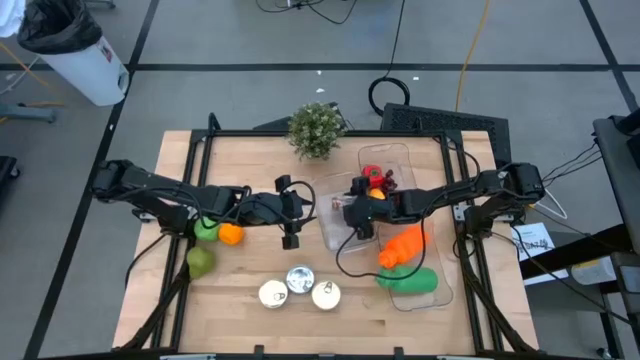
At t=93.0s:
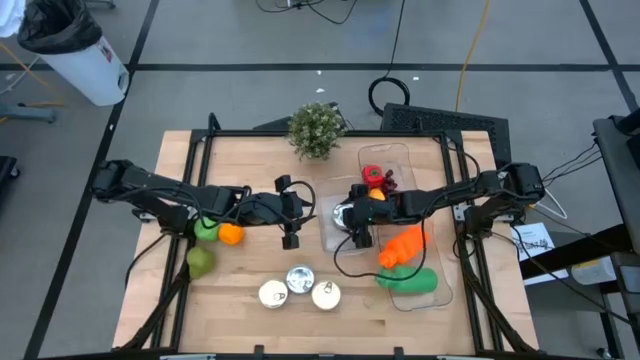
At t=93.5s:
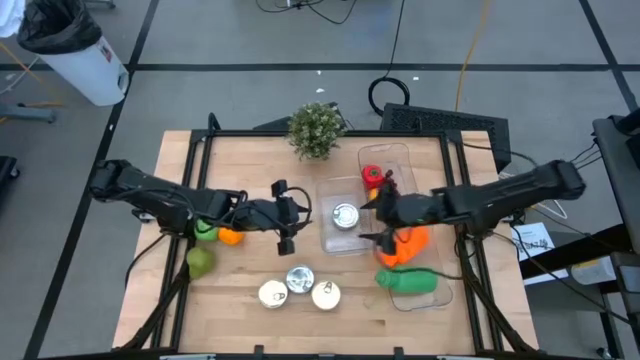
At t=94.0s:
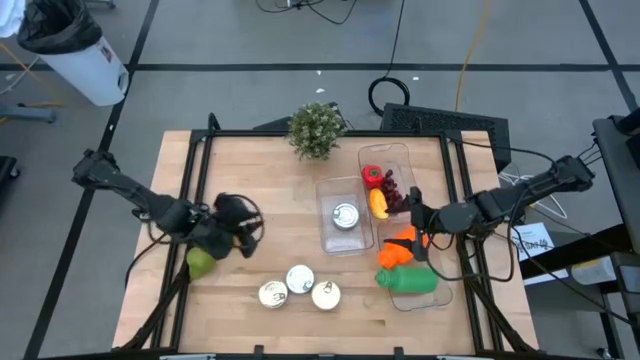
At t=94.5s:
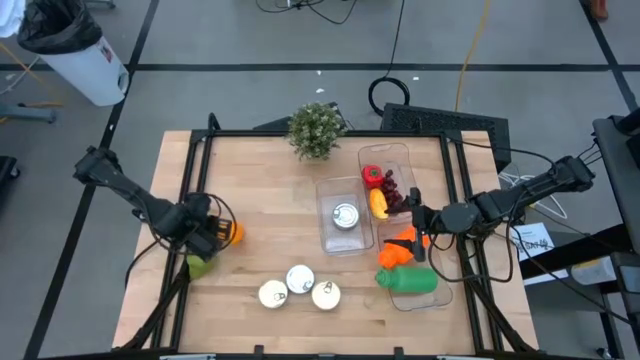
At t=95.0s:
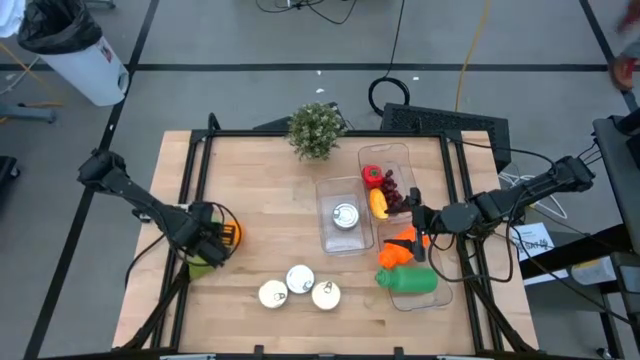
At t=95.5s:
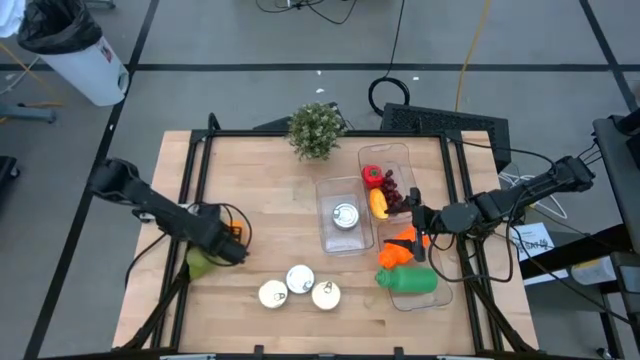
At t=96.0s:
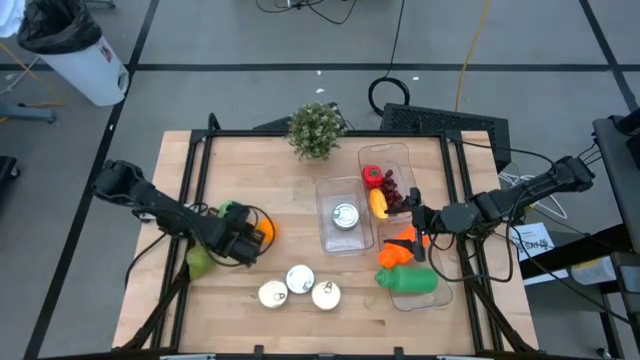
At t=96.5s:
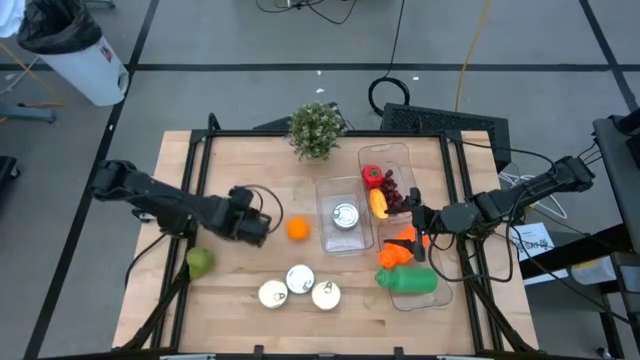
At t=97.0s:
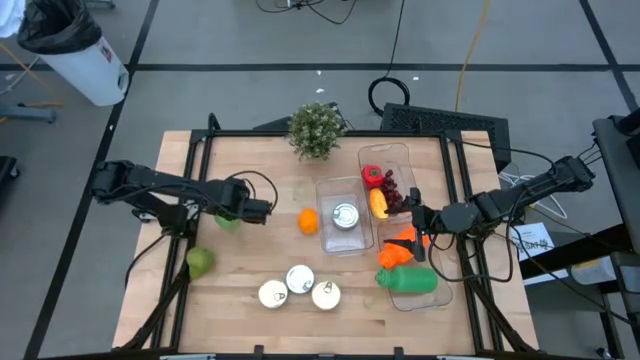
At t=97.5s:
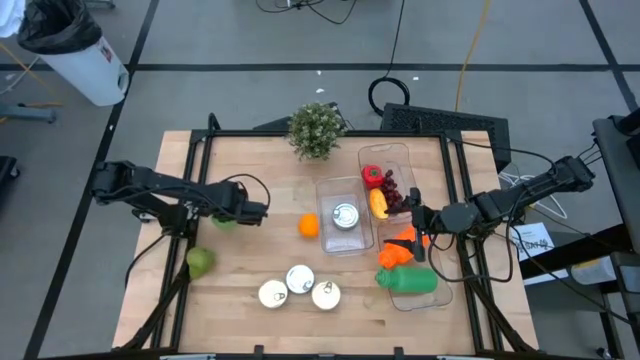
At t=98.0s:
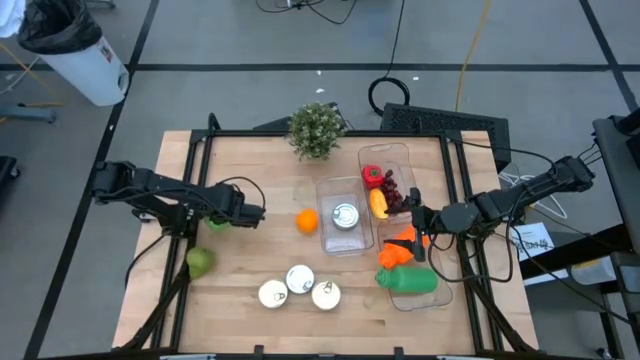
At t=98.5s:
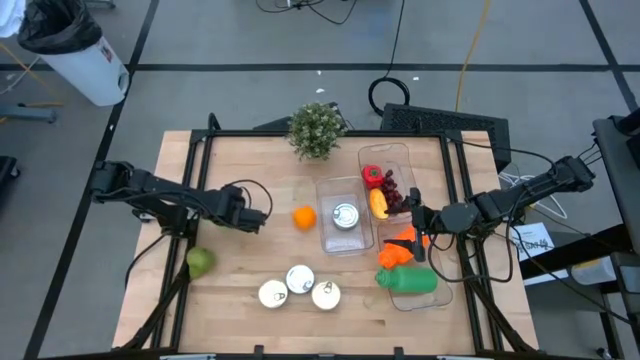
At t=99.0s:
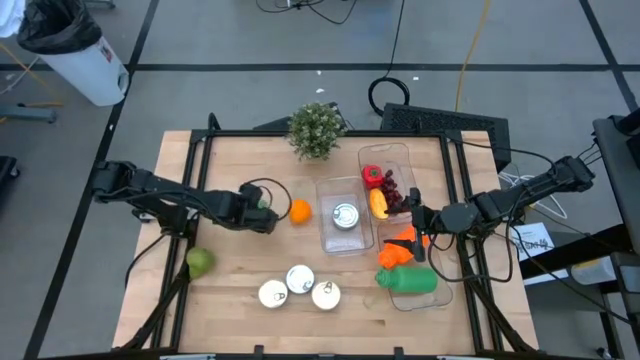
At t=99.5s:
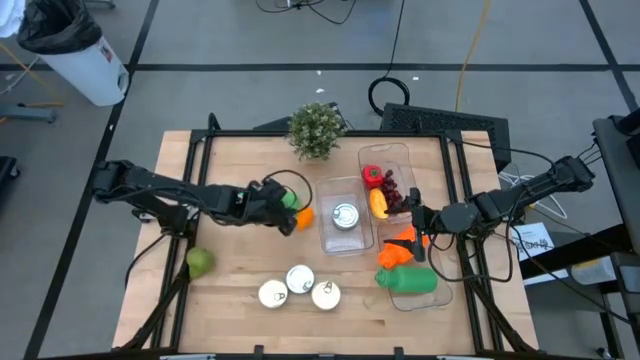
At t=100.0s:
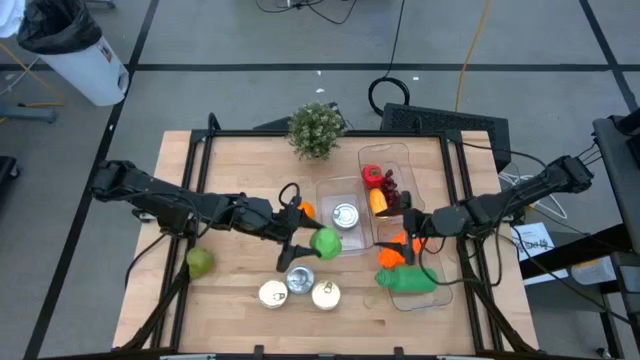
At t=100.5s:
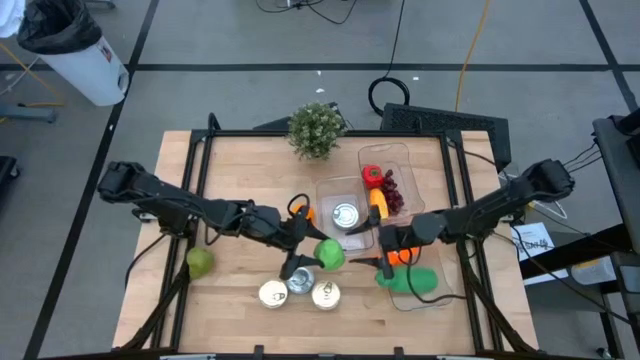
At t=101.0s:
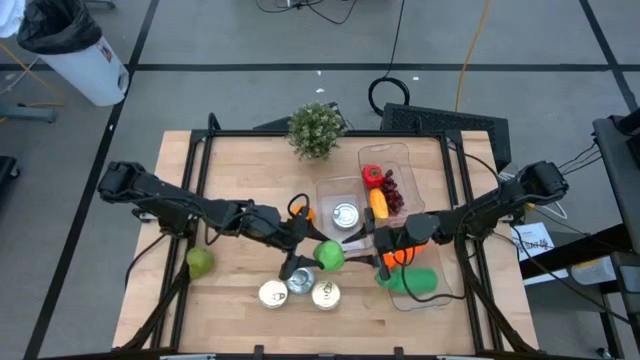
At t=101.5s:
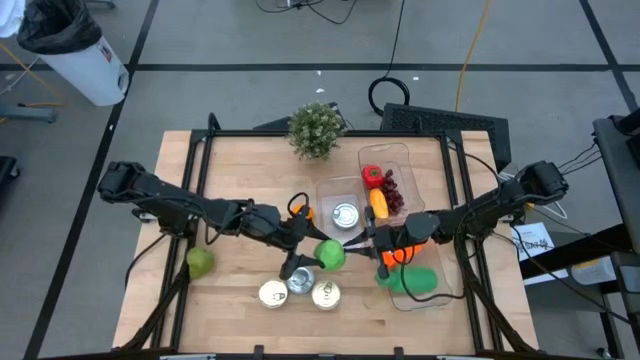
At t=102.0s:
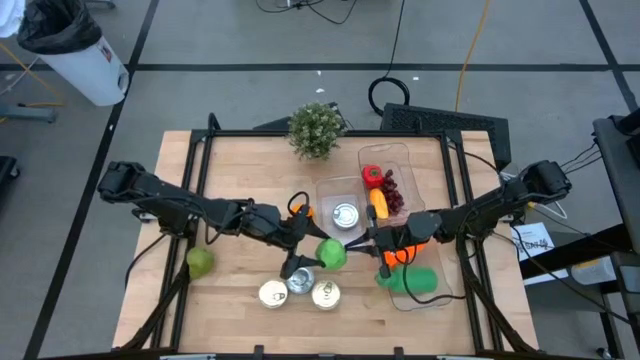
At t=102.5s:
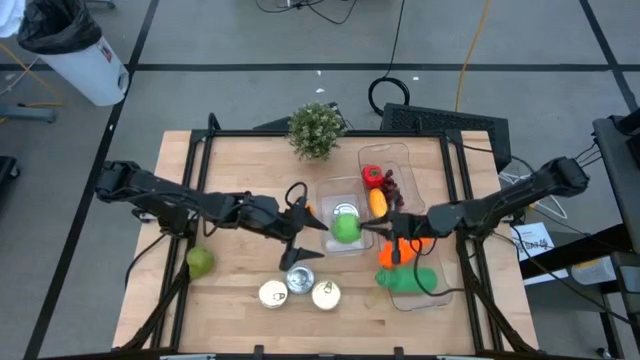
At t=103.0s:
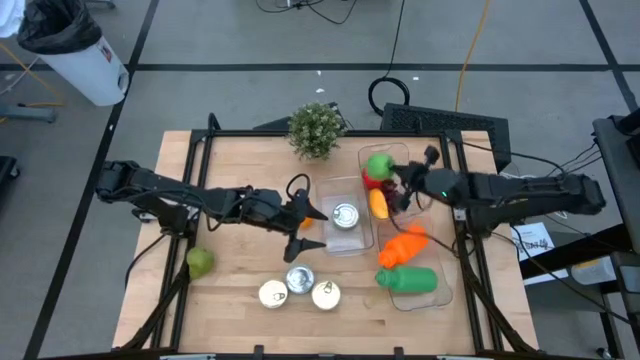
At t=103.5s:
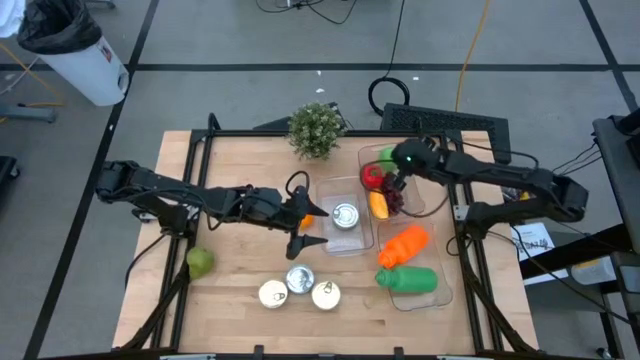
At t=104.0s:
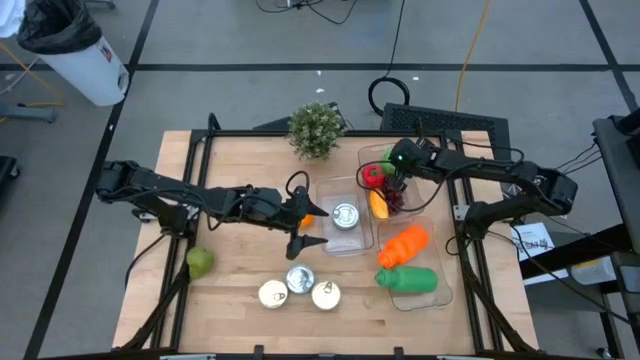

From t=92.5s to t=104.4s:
Task: Pick & Place Food Item
Put the green apple into the top transparent bin

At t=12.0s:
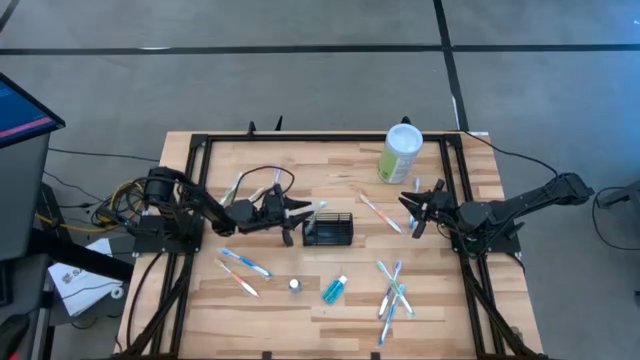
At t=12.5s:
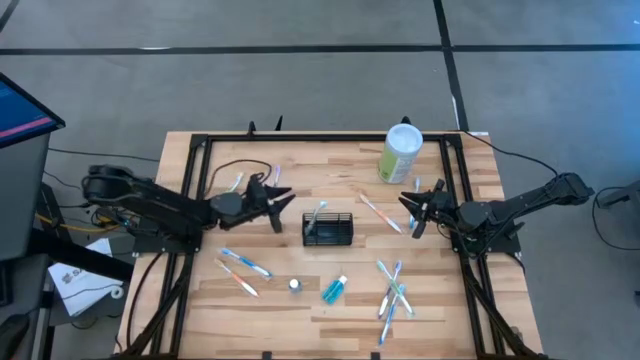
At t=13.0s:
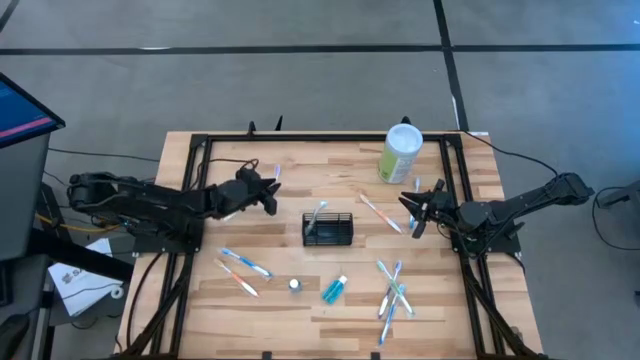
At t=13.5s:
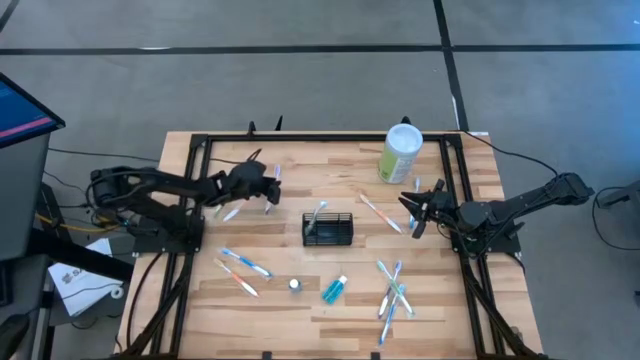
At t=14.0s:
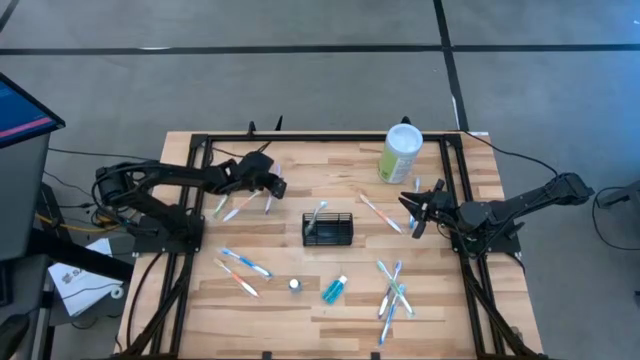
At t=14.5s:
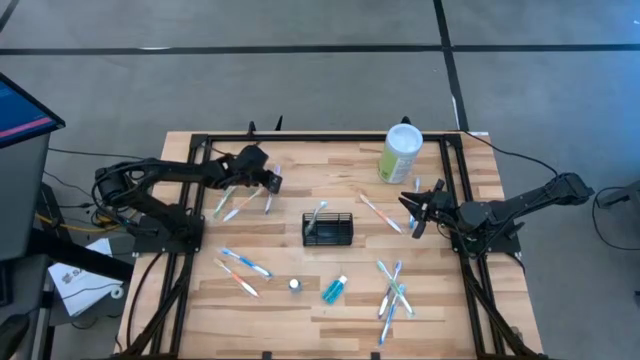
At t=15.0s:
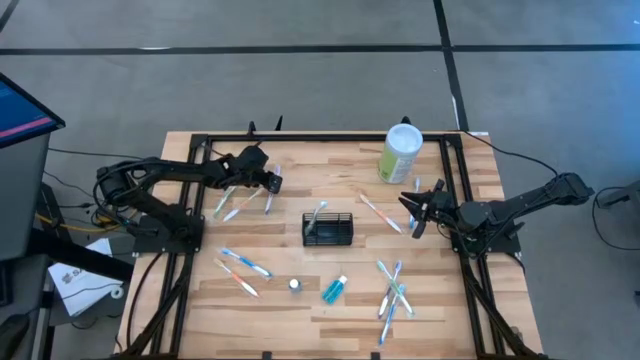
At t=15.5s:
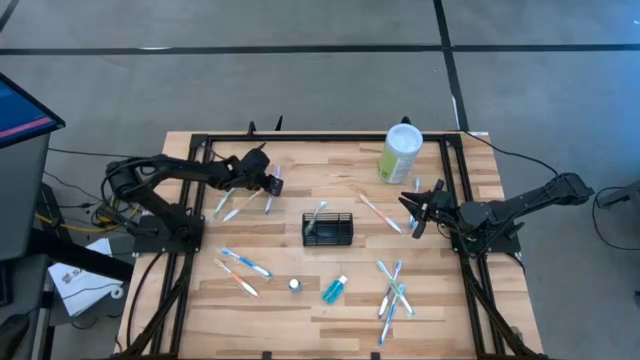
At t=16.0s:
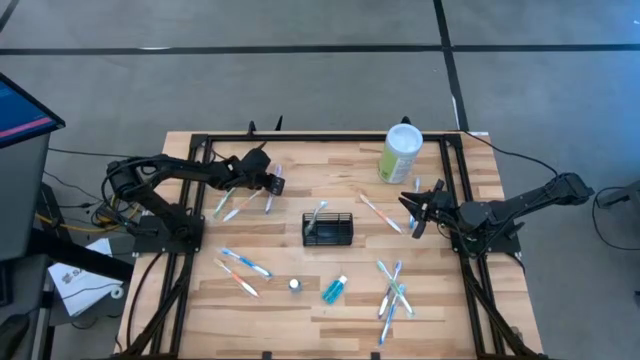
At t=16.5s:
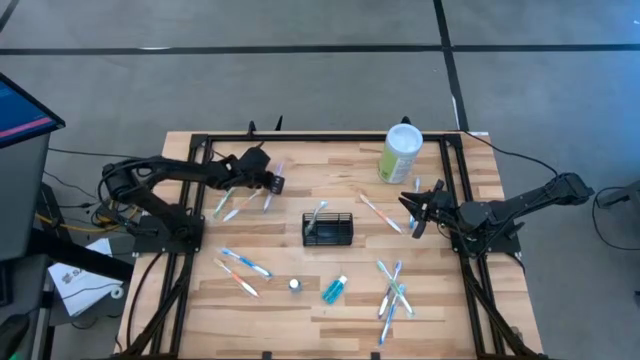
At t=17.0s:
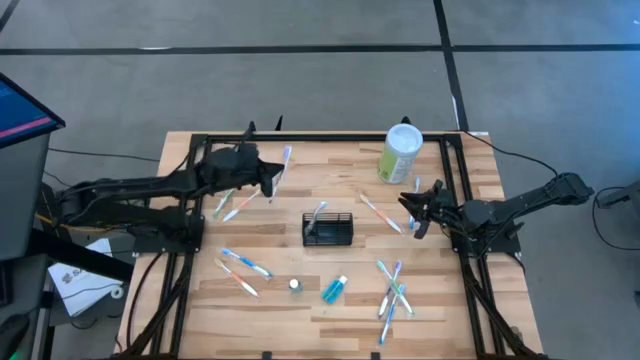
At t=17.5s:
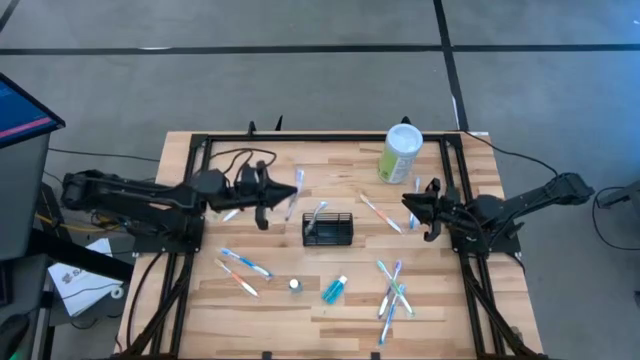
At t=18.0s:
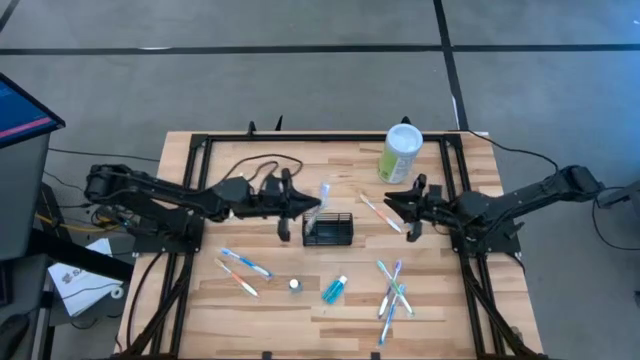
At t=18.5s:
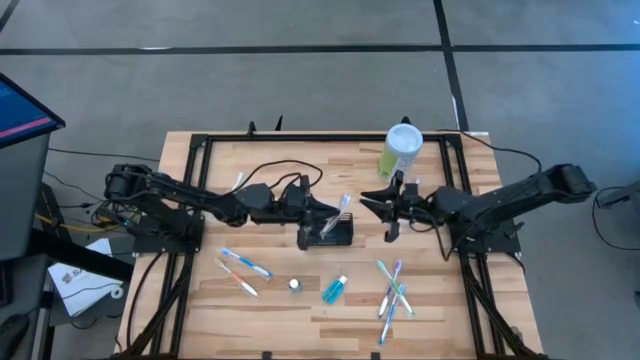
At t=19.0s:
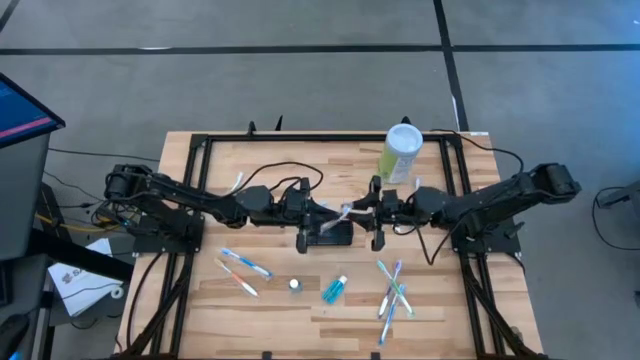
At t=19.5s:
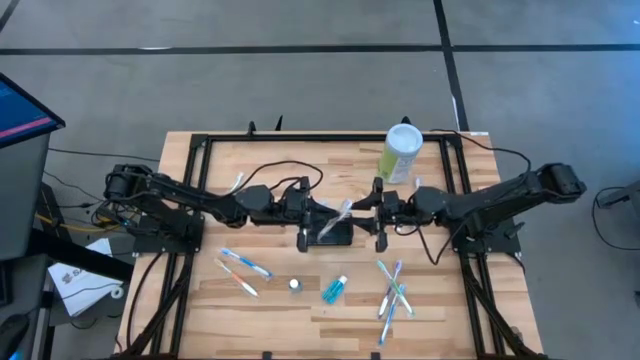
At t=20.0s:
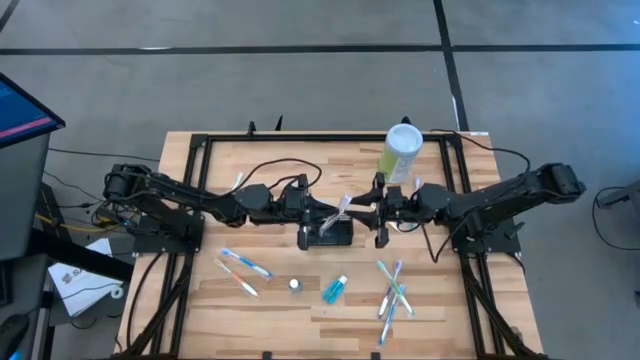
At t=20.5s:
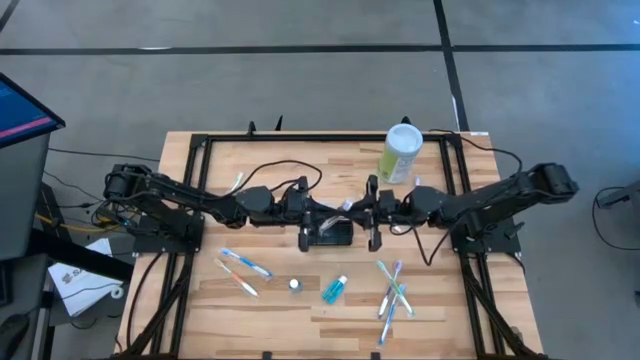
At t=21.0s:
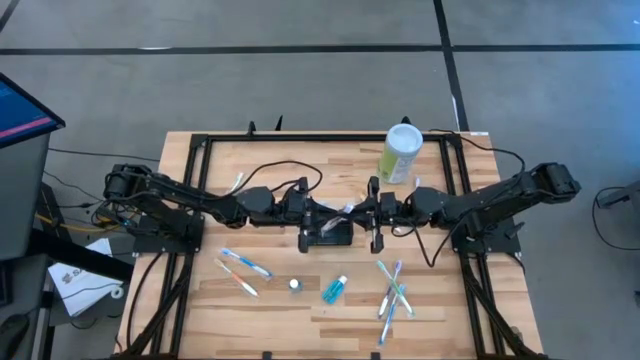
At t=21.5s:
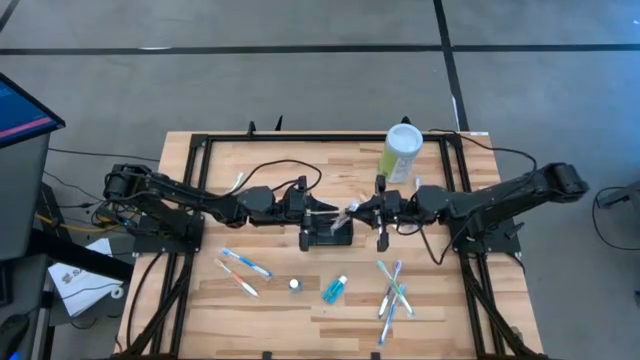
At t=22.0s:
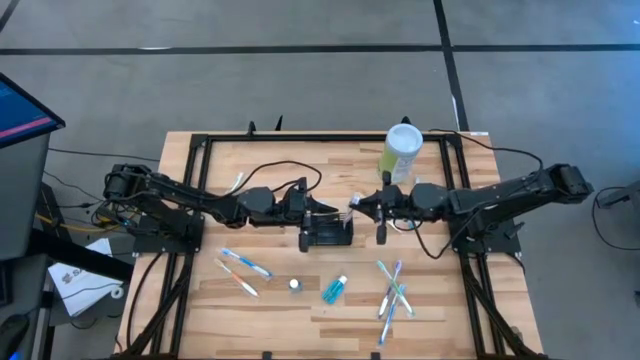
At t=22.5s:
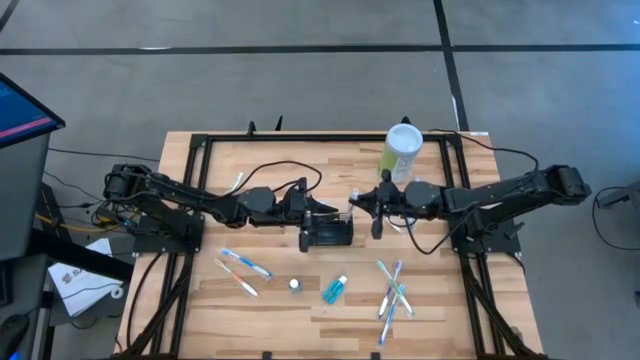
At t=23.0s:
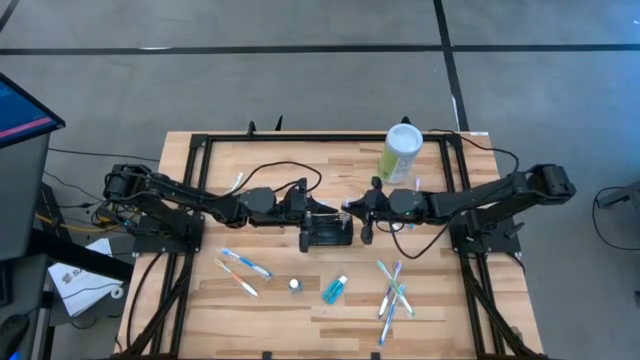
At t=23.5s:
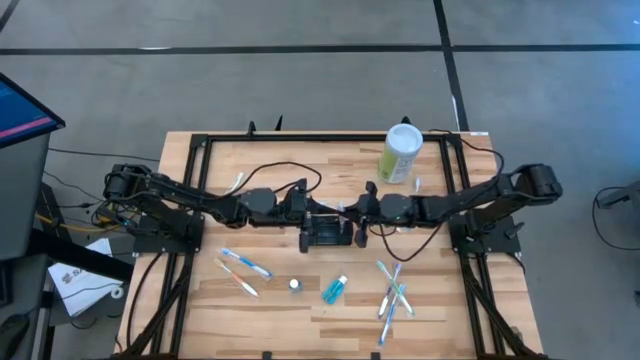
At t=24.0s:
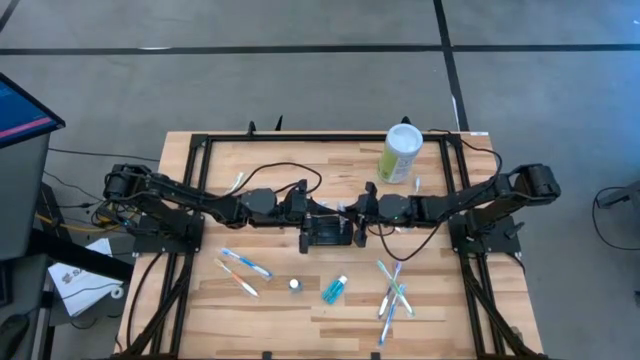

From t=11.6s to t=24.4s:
Task: Pick & Place toothbrushing station
Put the top purple toothbrush into the right compartment of the organizer
